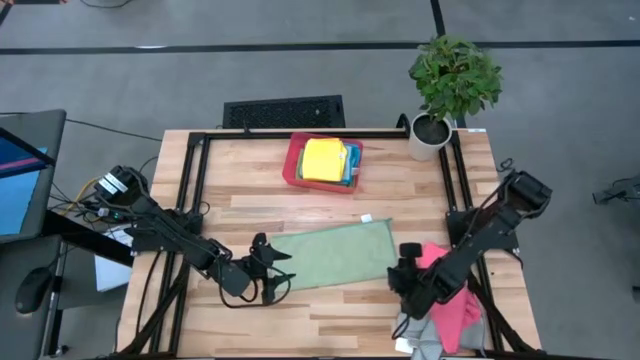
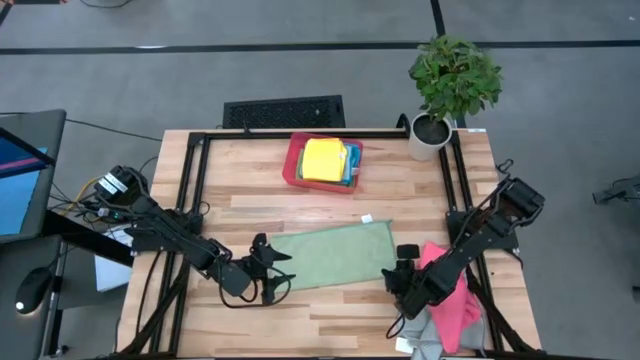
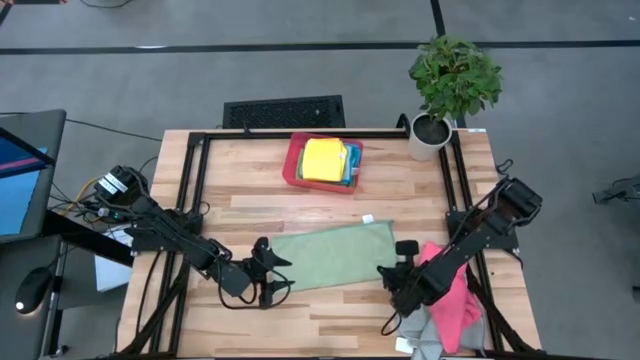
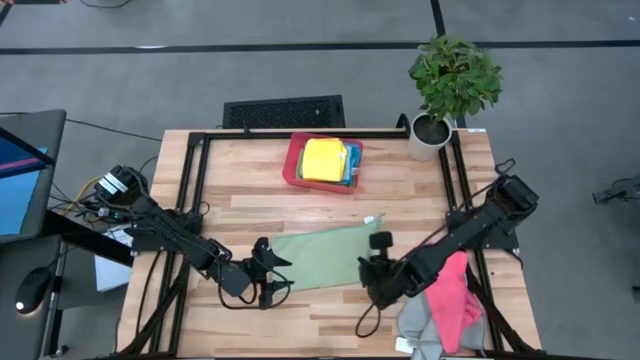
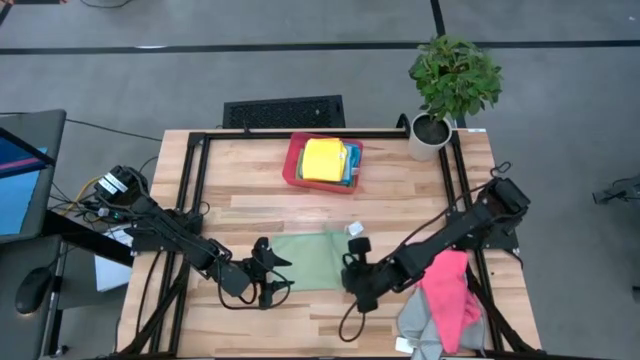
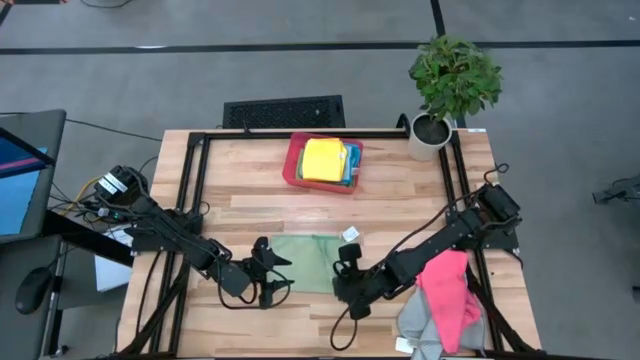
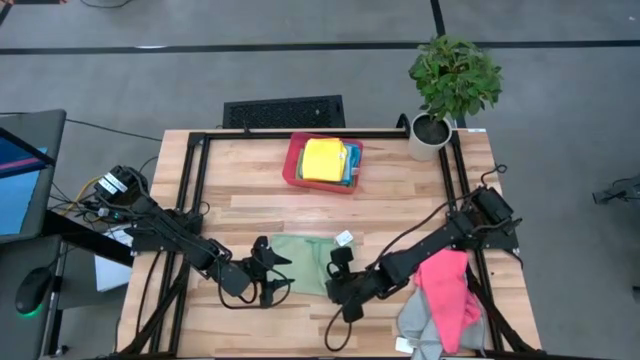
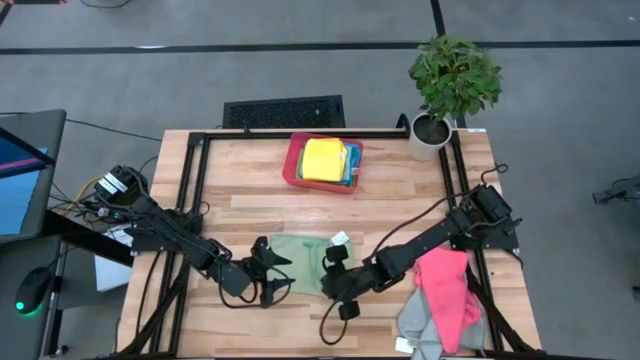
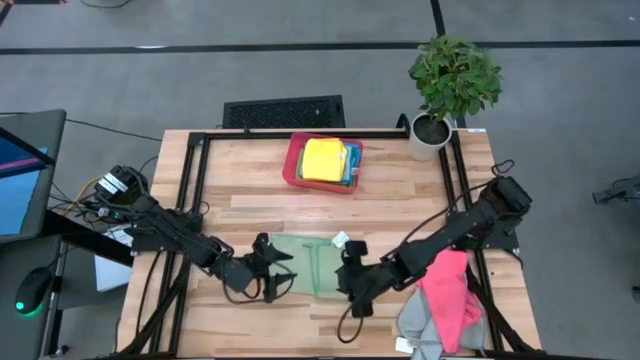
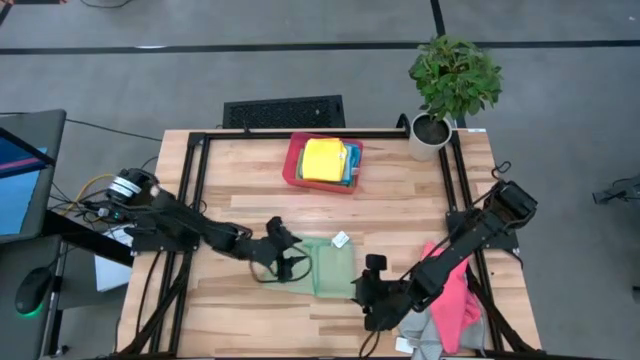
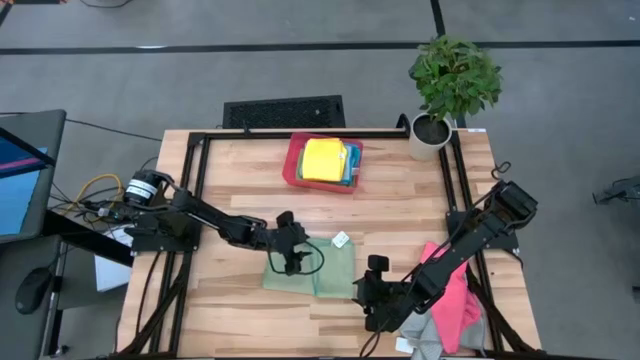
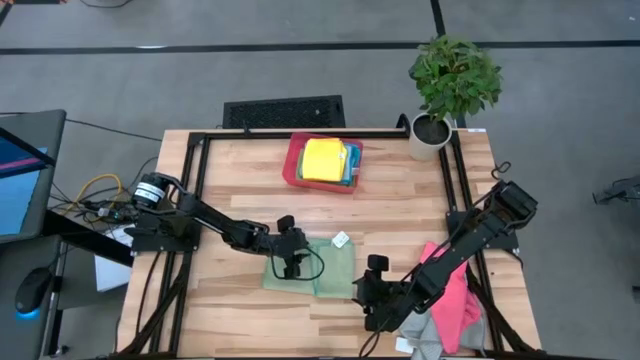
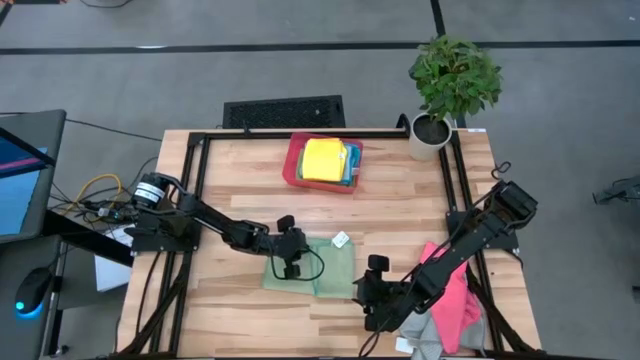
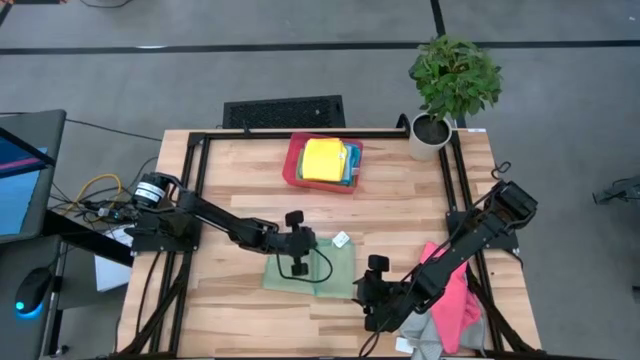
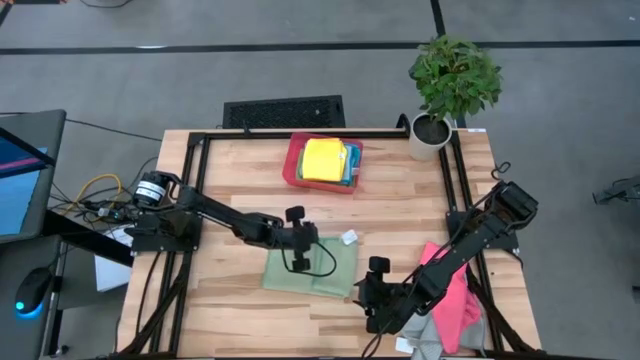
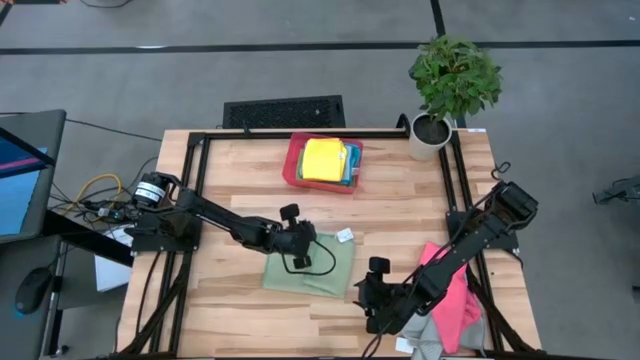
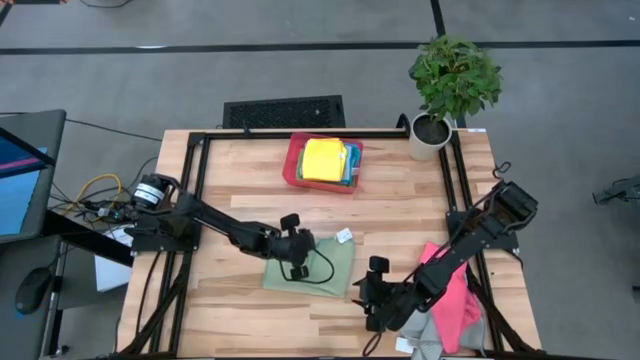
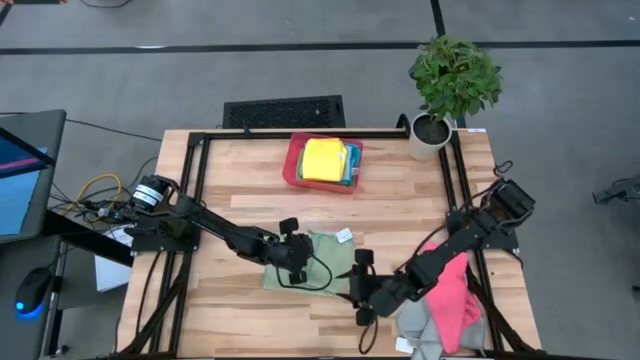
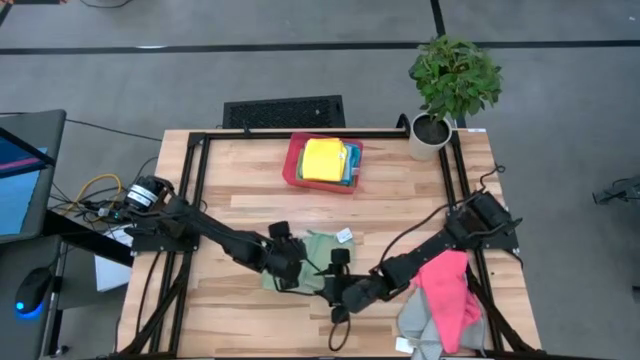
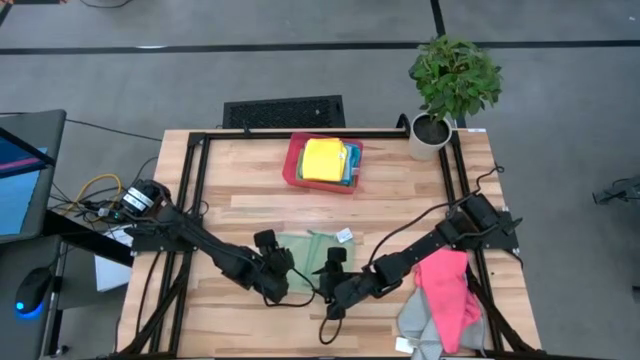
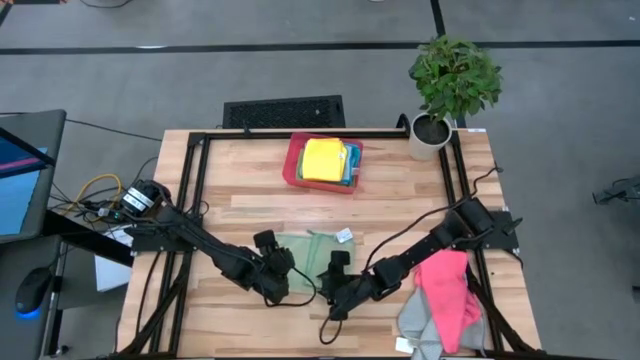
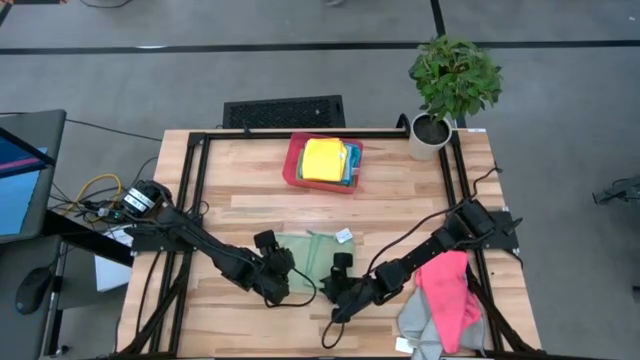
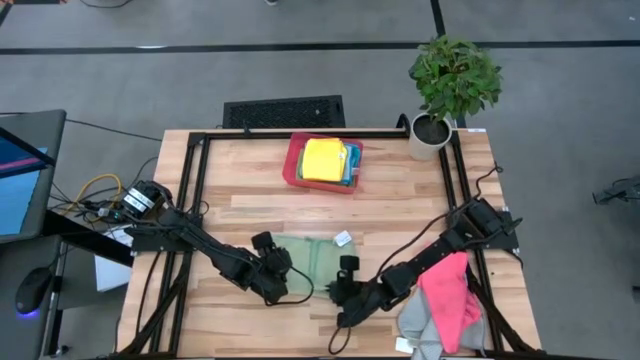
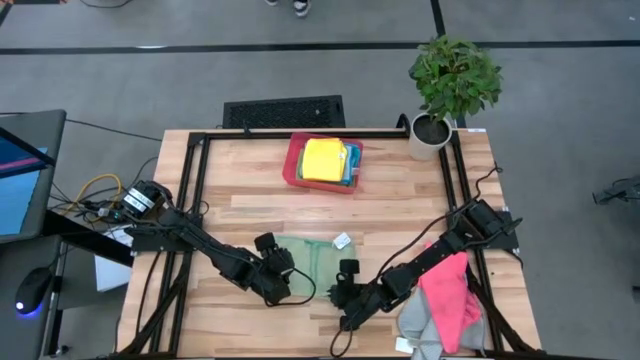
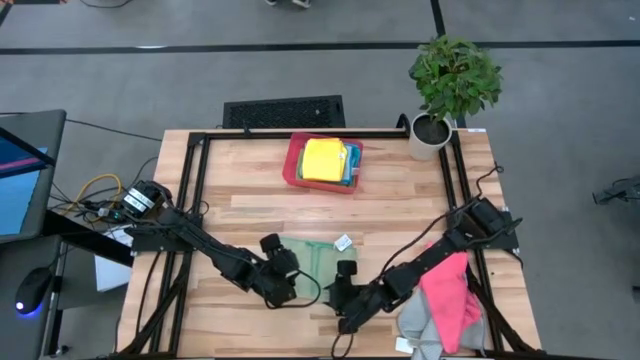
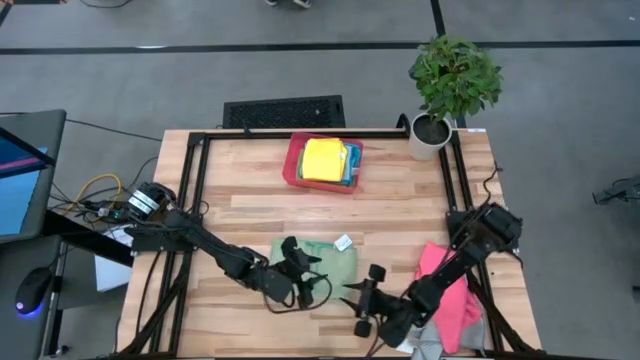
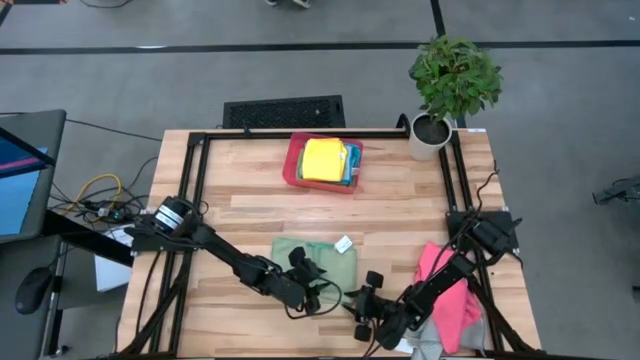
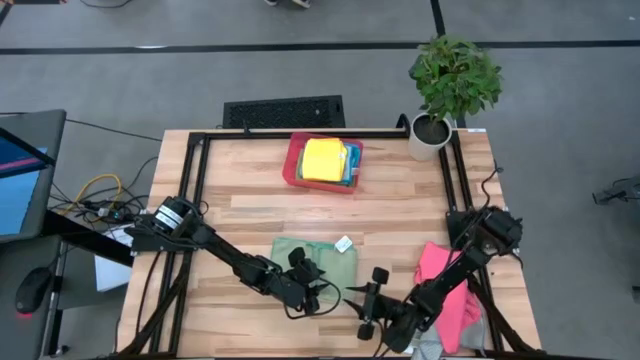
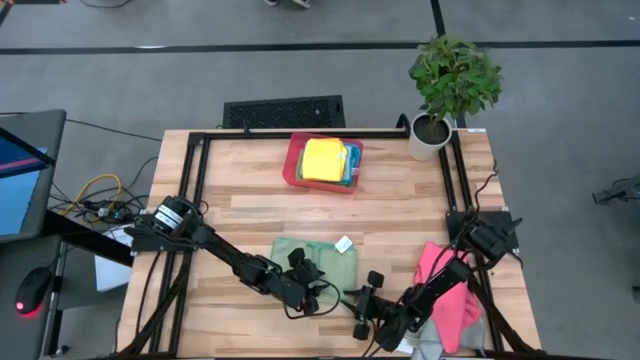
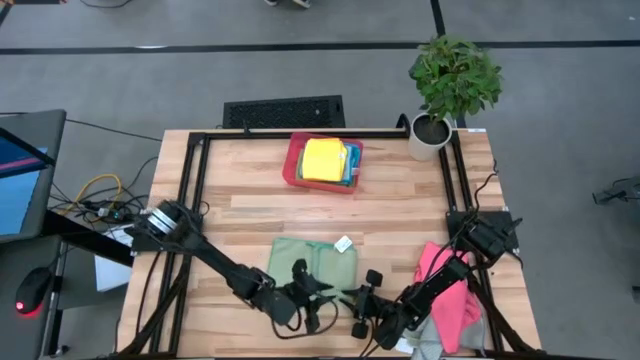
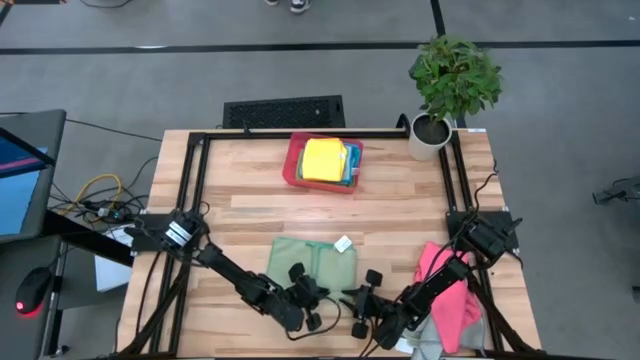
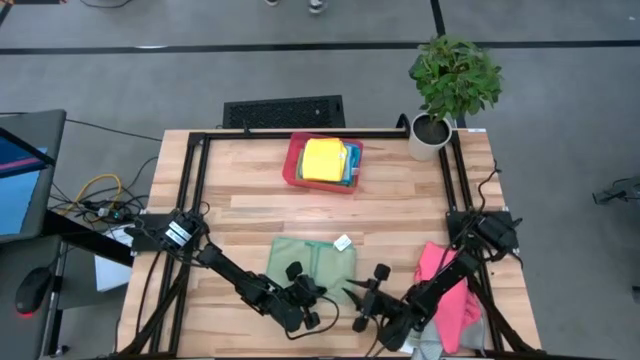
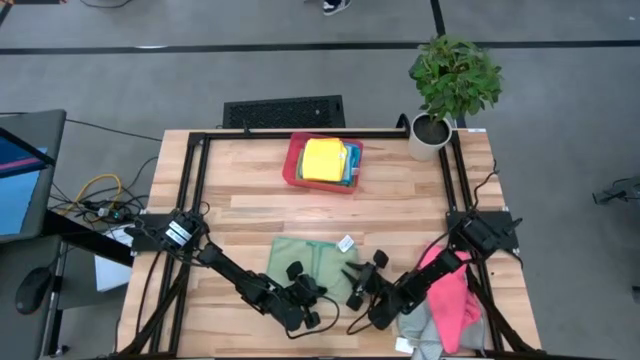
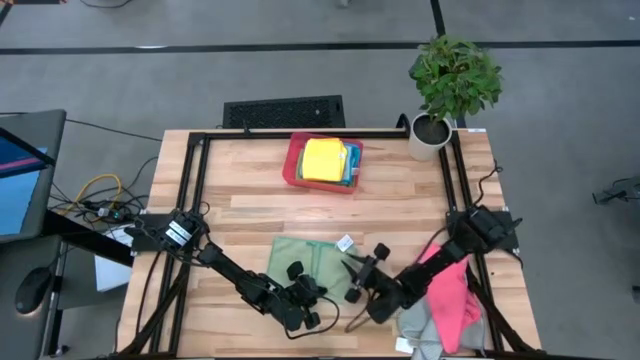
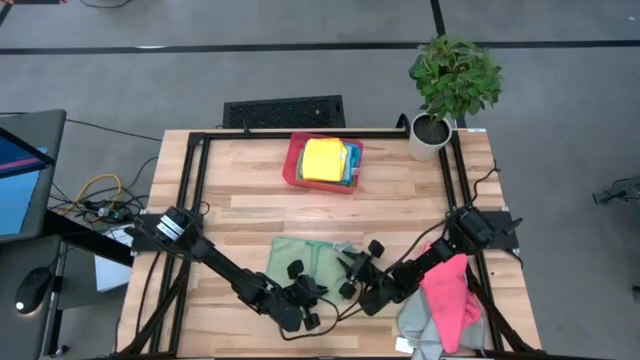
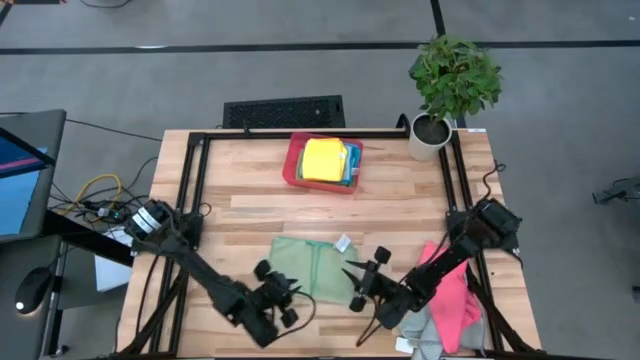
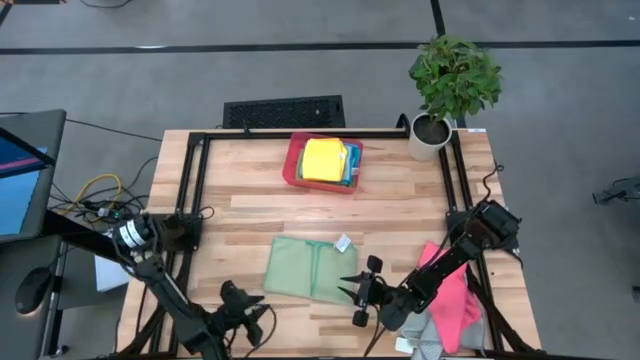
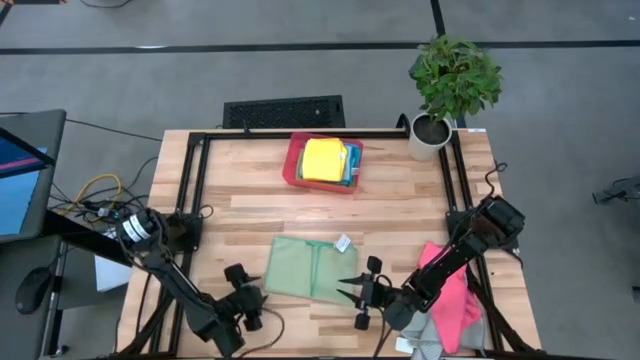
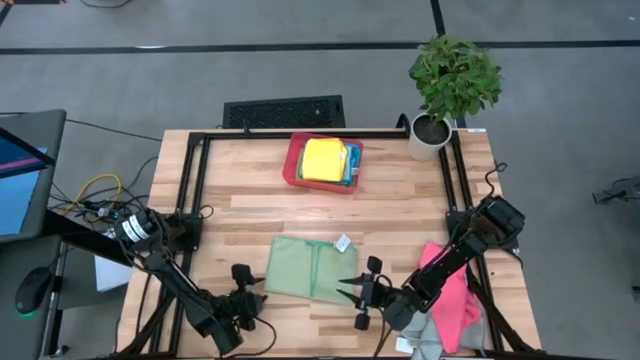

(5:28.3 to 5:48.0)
Task: Fold microfiber towels
Fold the green microfiber cloth

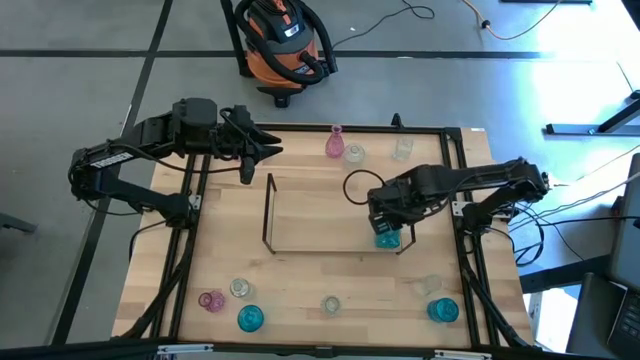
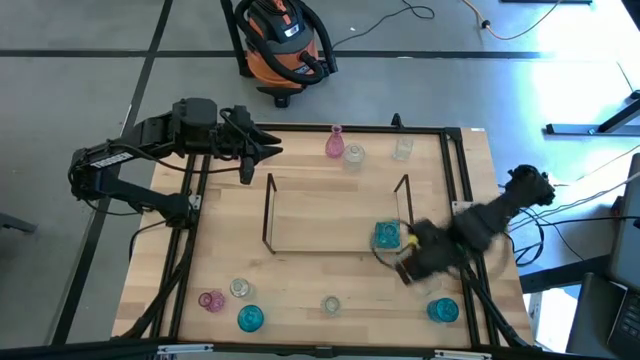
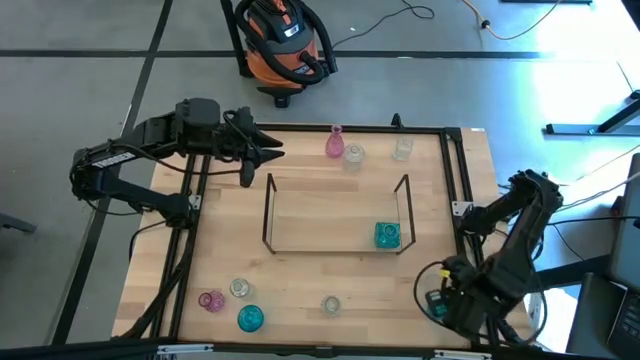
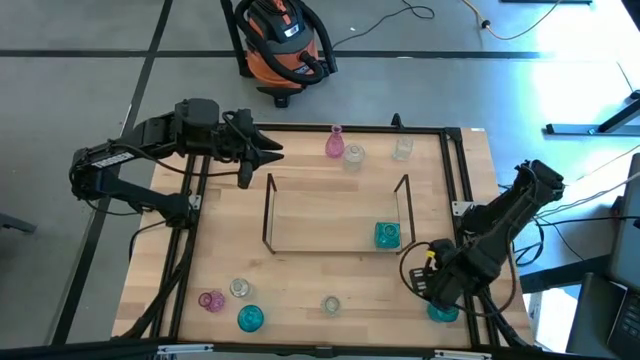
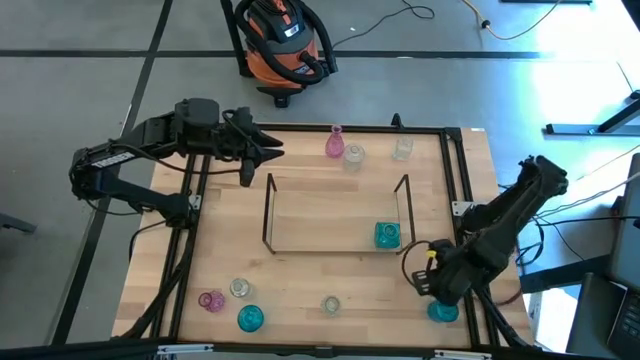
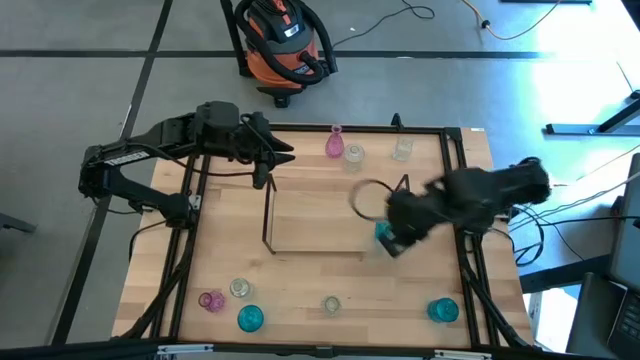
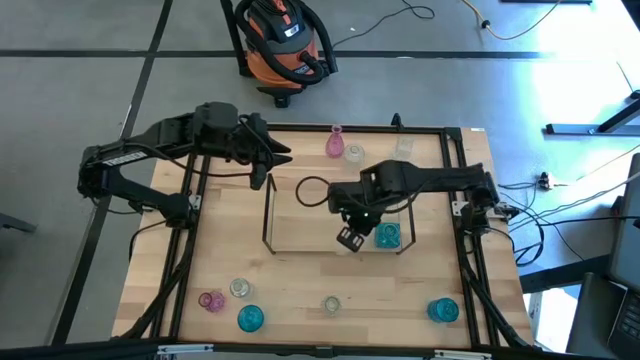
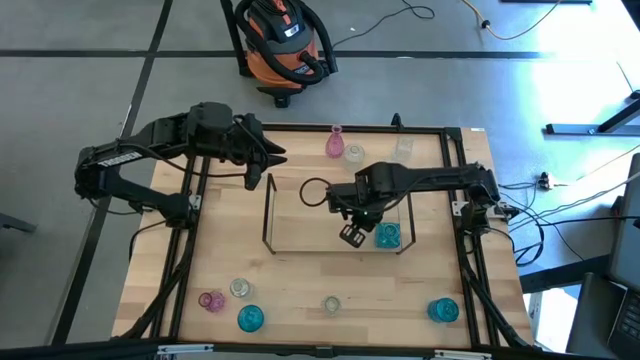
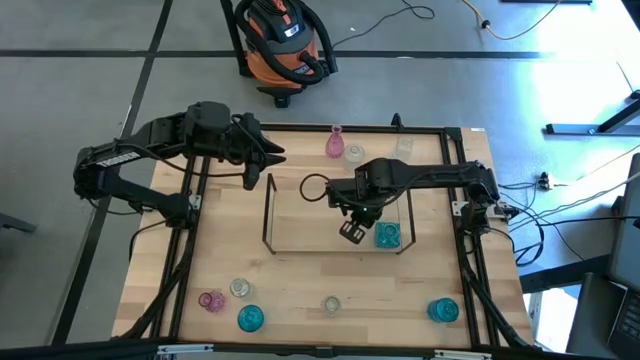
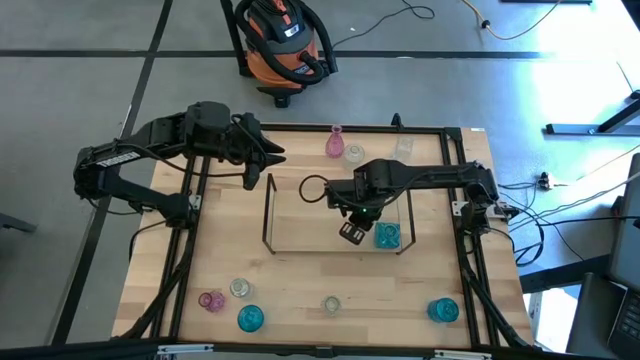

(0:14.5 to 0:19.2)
Task: sort vases onto shelf
Put the transparent vase on the shelf
